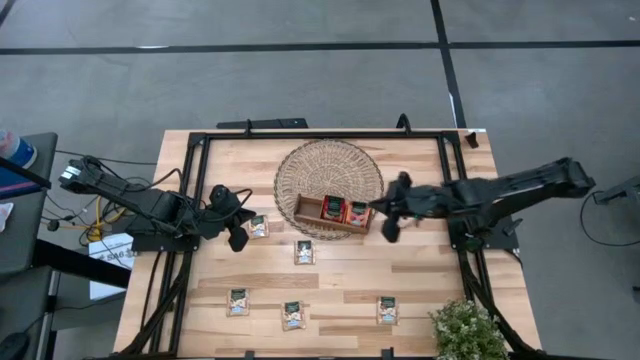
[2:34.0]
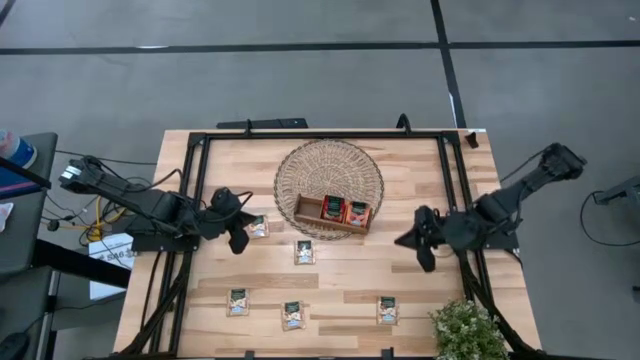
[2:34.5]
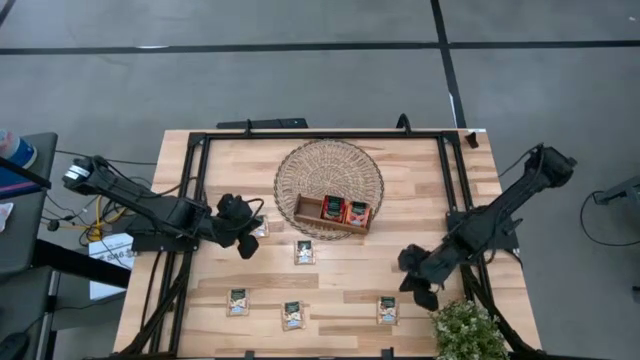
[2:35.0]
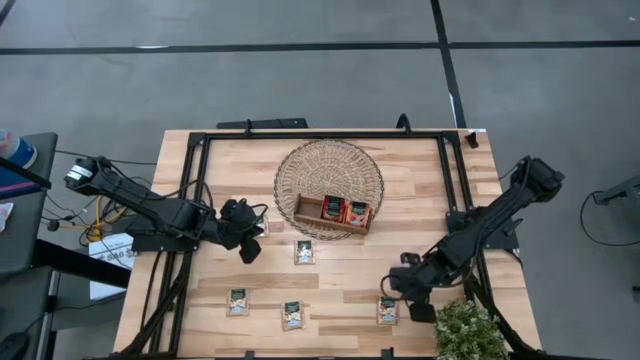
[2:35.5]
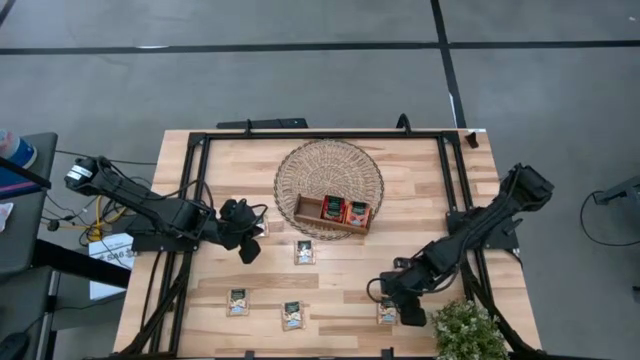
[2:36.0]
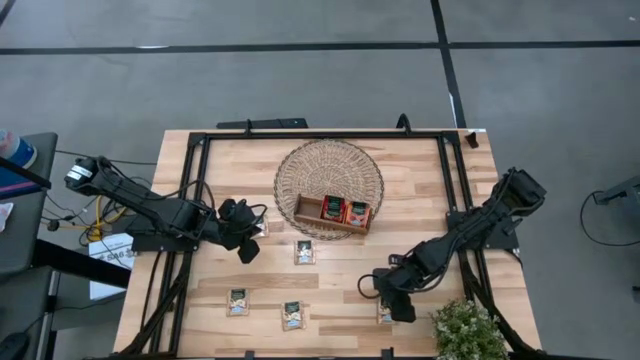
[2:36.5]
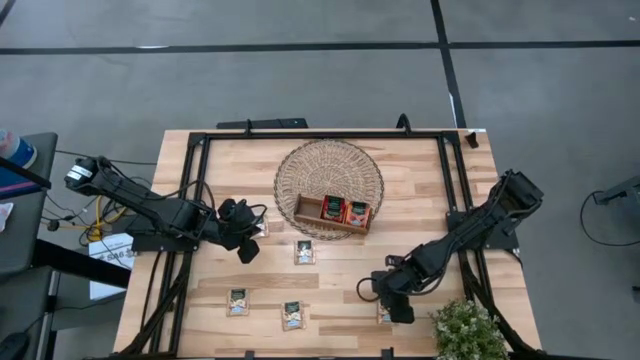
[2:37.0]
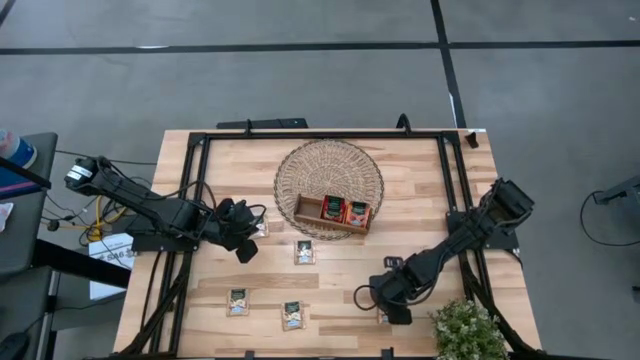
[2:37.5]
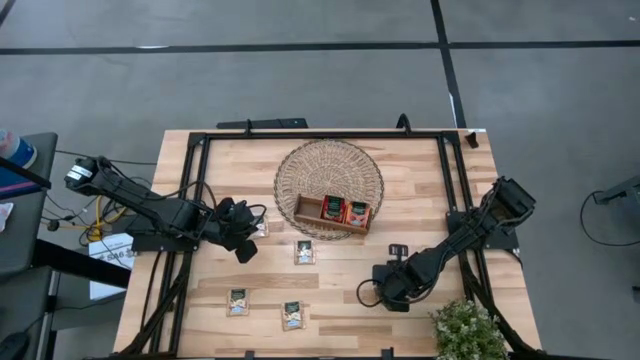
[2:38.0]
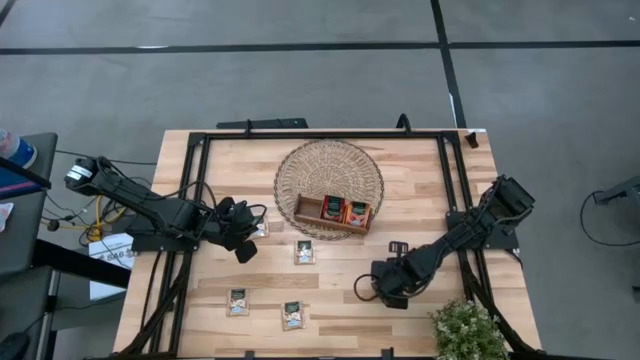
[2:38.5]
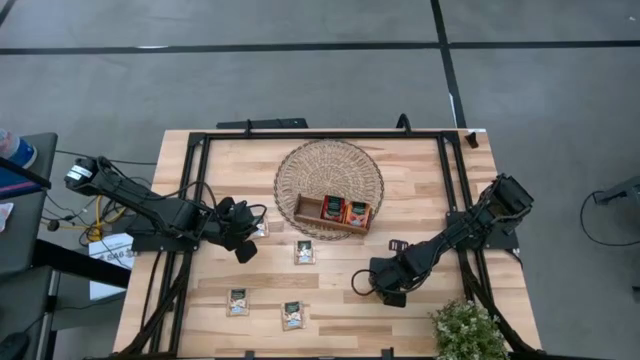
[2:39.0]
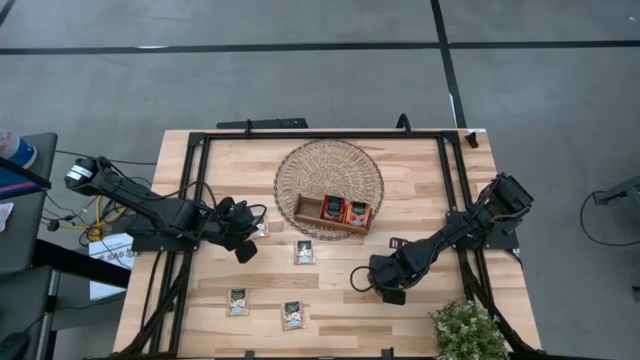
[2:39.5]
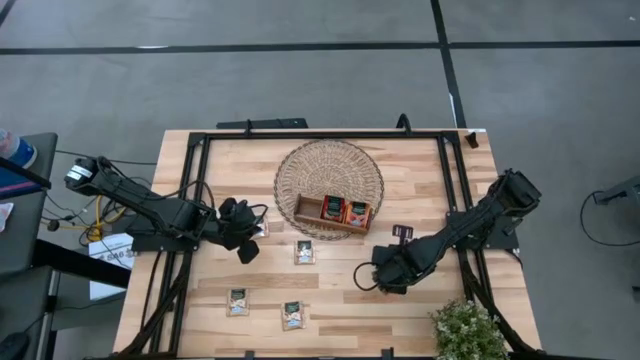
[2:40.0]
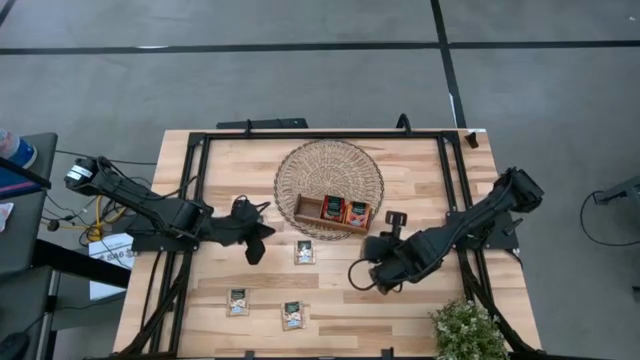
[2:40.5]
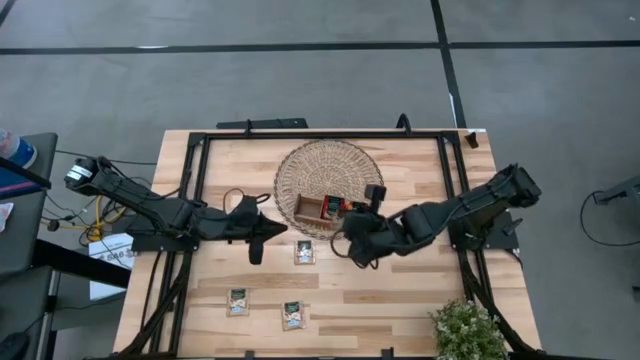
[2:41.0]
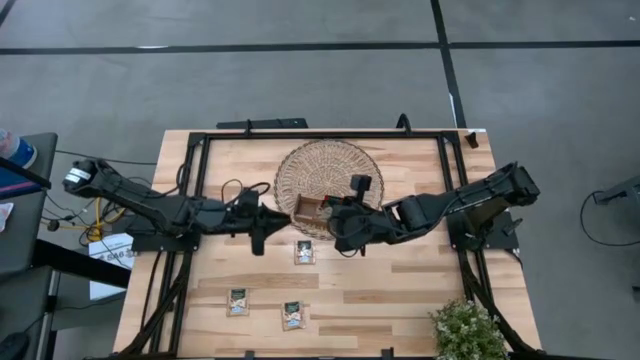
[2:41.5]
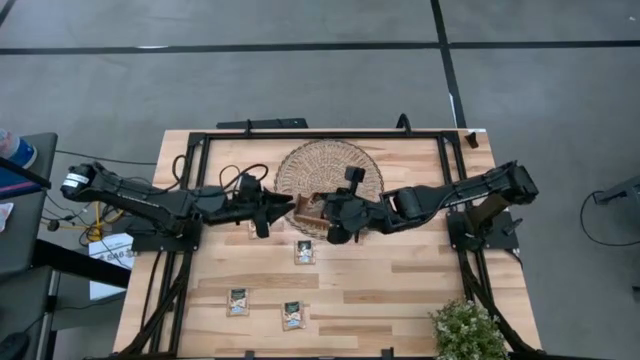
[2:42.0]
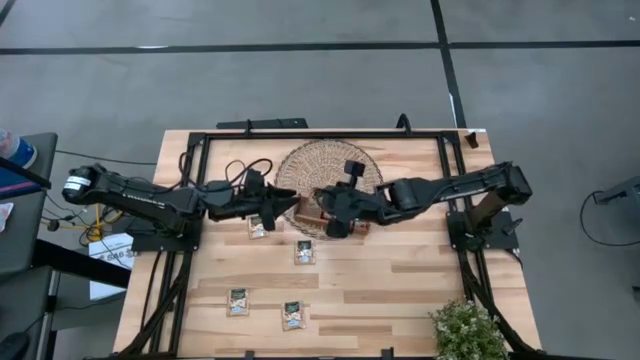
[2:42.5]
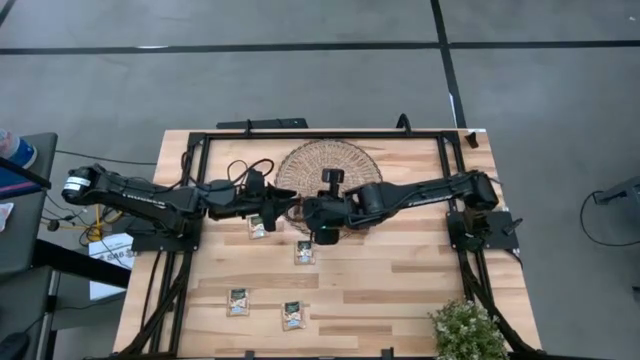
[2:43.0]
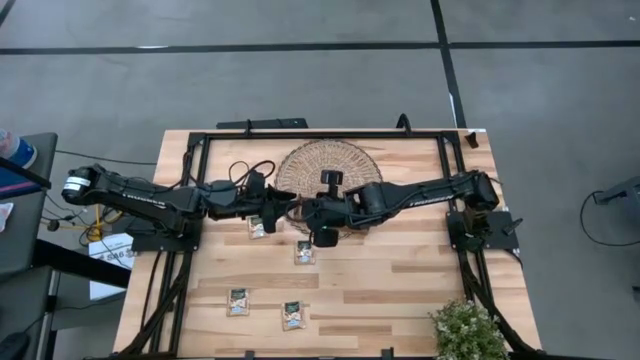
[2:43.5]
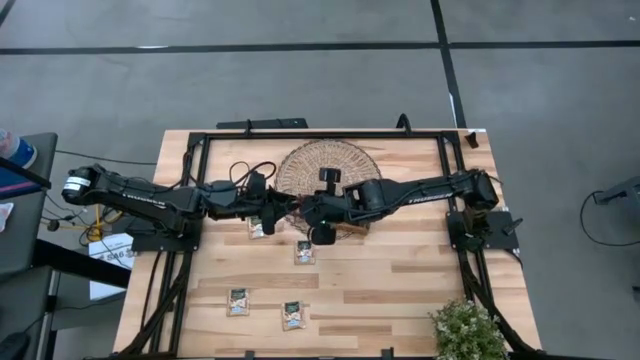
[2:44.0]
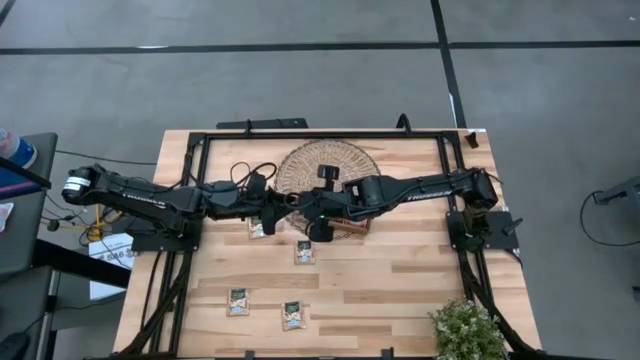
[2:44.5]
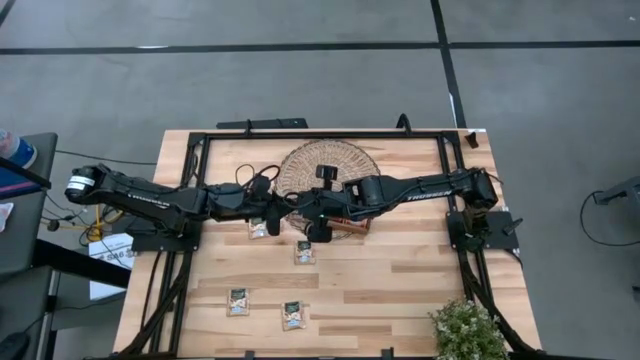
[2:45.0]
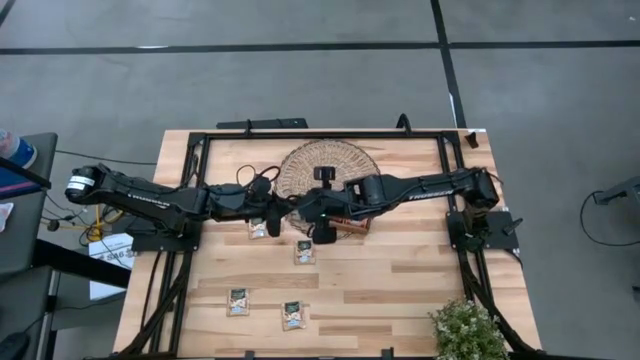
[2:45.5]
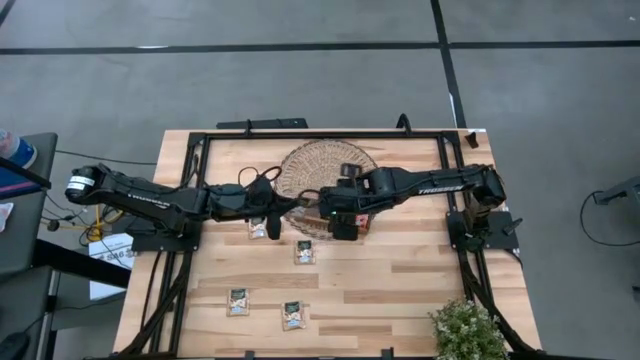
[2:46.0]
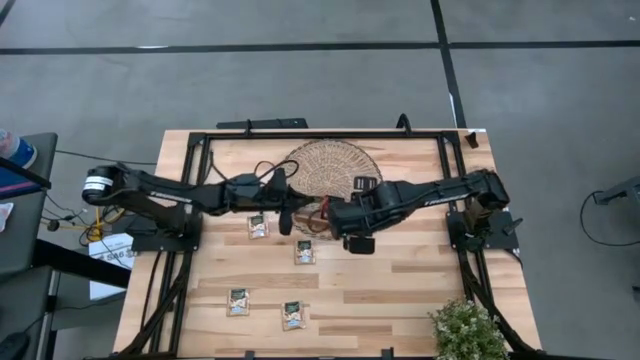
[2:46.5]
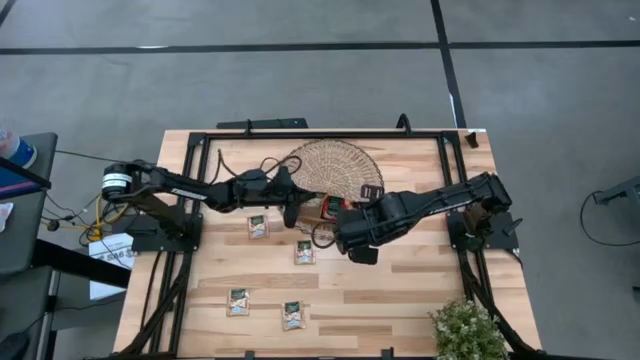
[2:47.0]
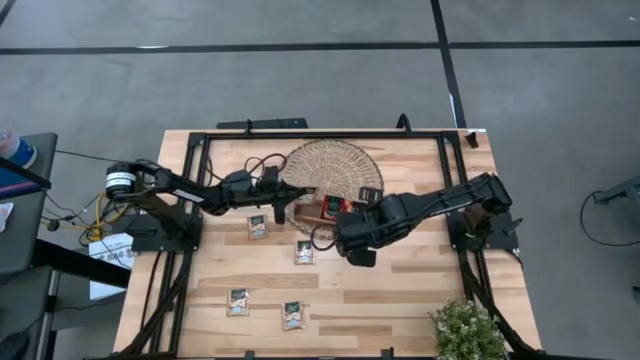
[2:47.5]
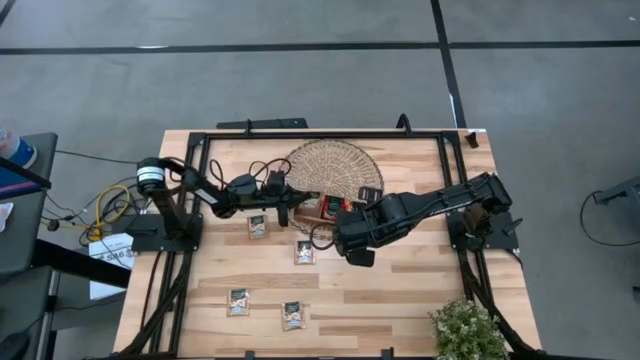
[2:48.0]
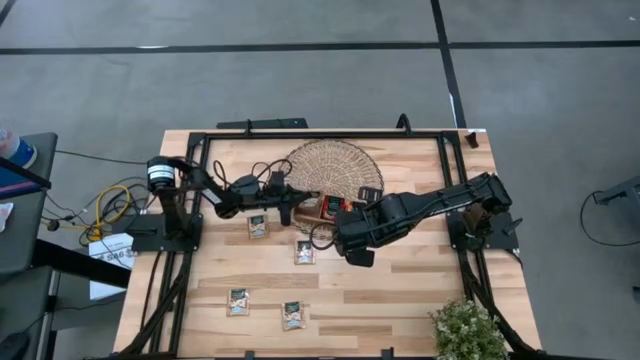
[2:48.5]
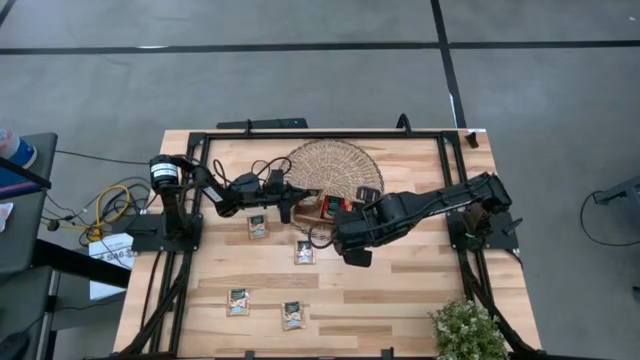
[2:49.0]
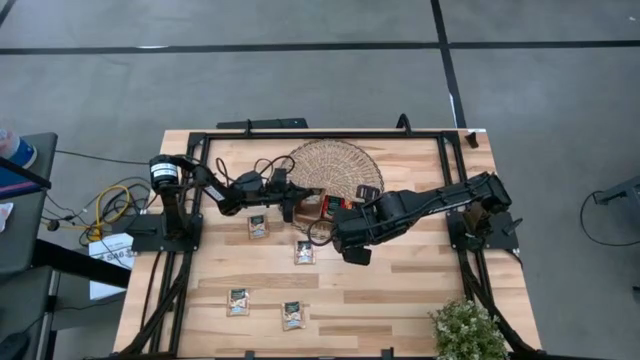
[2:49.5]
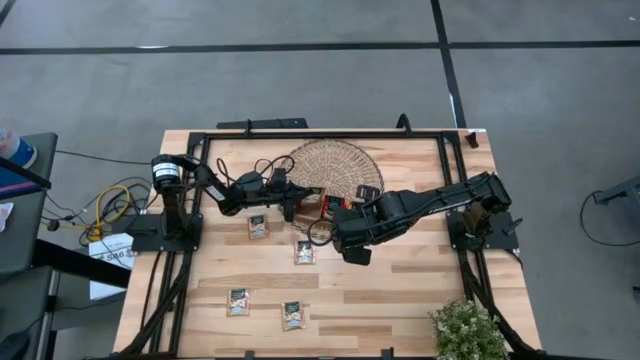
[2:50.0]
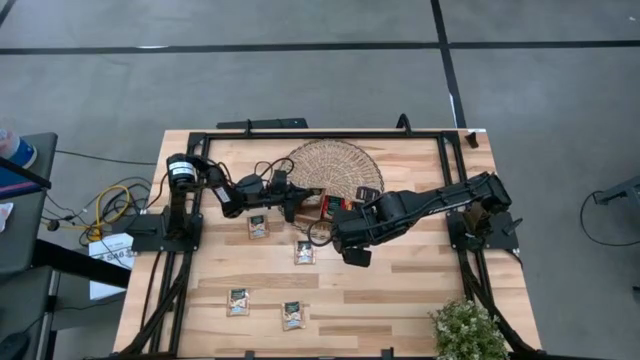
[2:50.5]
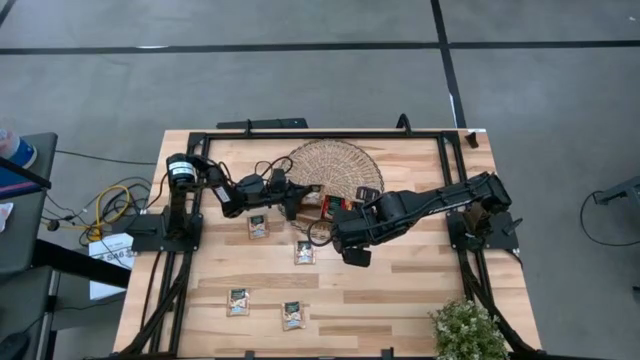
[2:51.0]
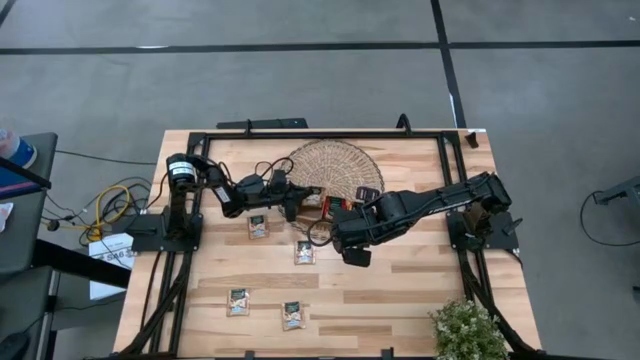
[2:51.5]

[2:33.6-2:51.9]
Task: Pick & Place Tea
Put the brown tea bag into the left section of the wooden organizer
